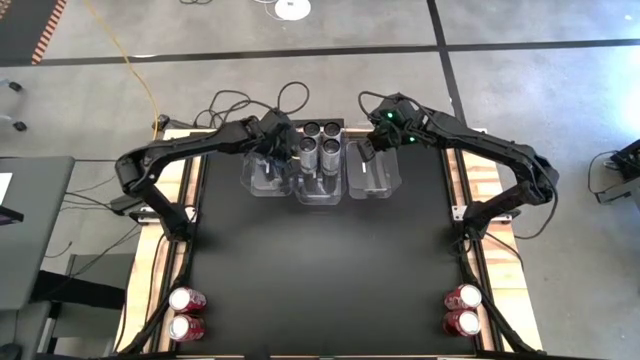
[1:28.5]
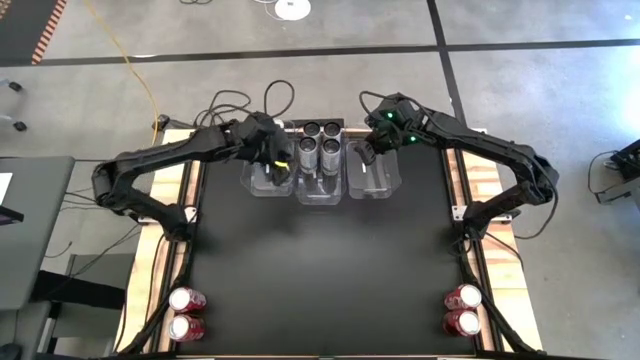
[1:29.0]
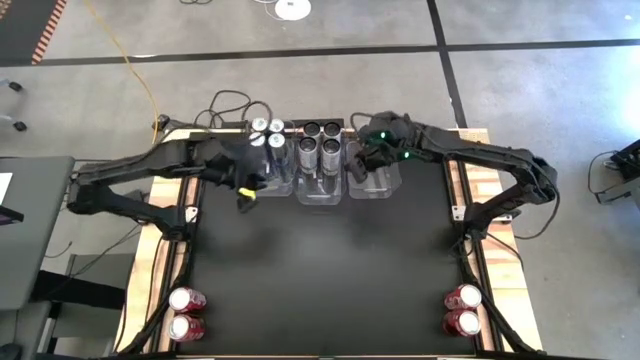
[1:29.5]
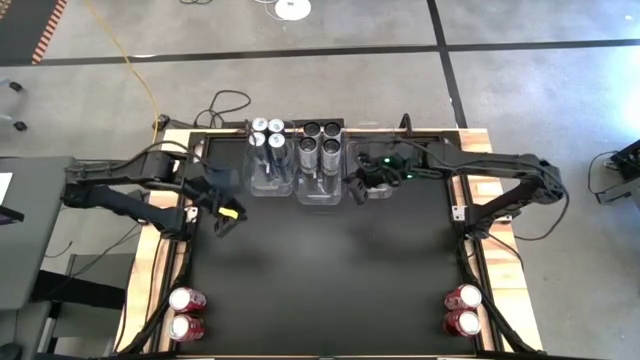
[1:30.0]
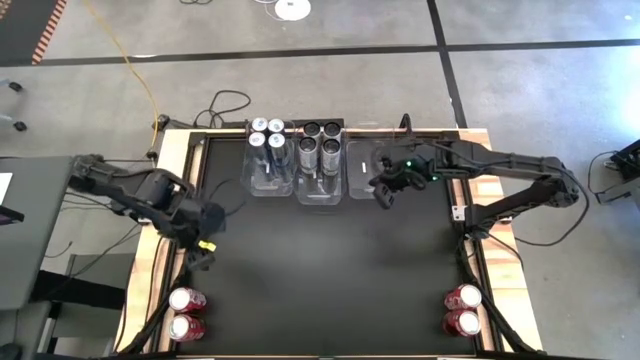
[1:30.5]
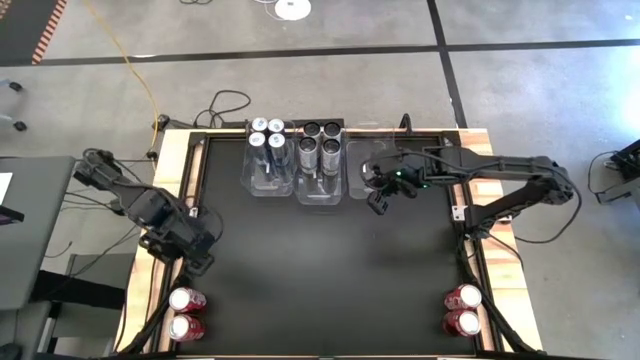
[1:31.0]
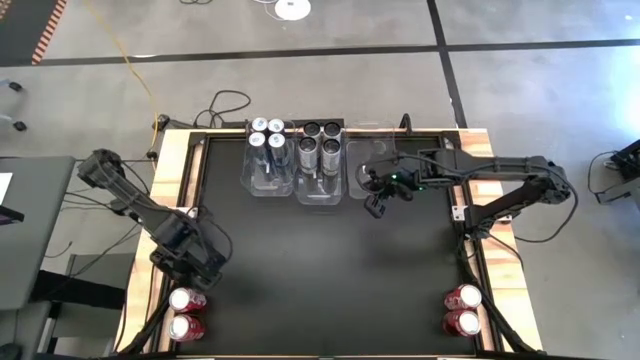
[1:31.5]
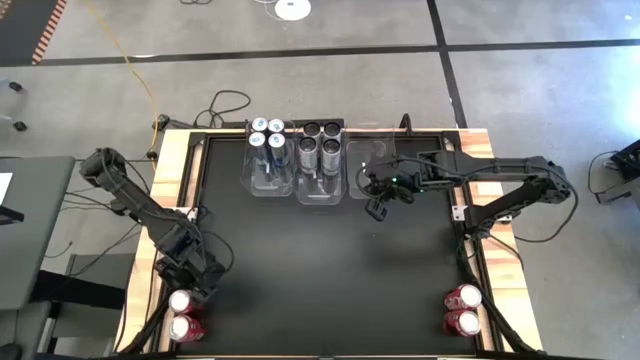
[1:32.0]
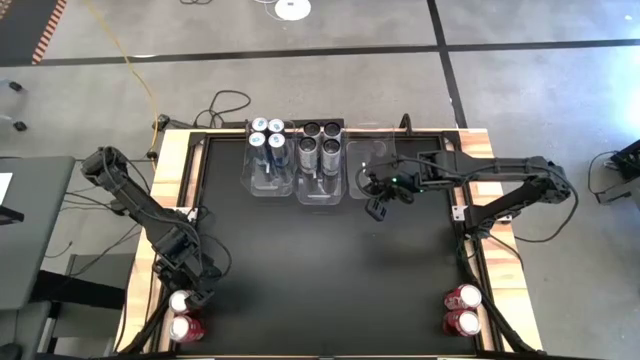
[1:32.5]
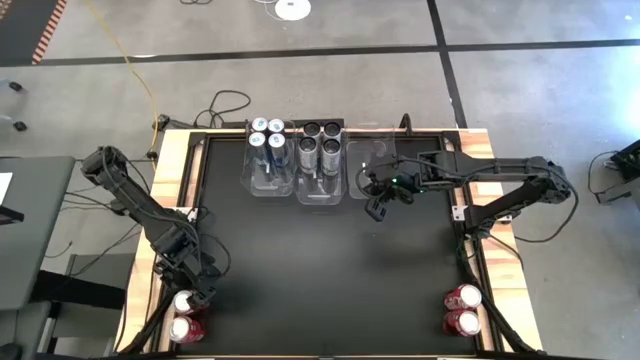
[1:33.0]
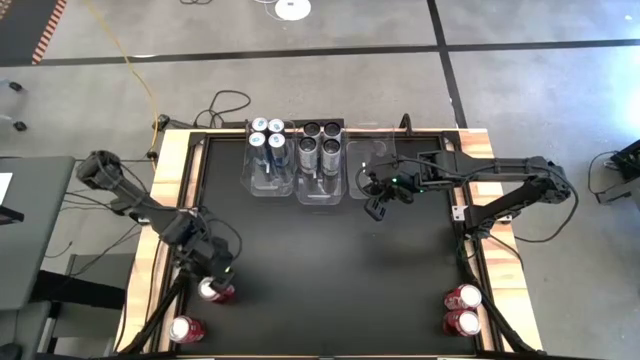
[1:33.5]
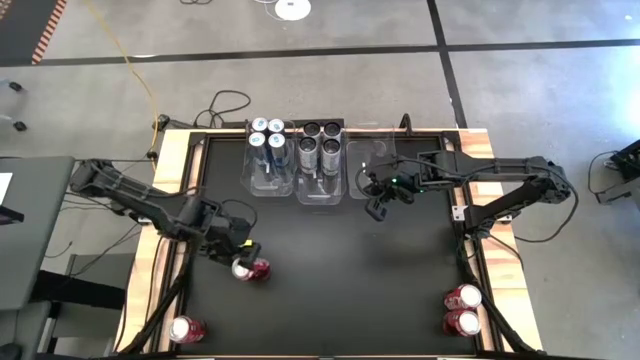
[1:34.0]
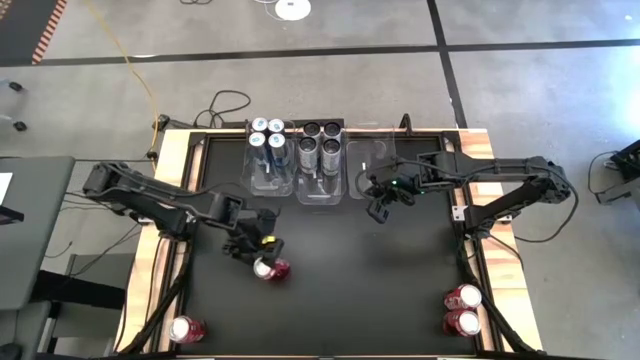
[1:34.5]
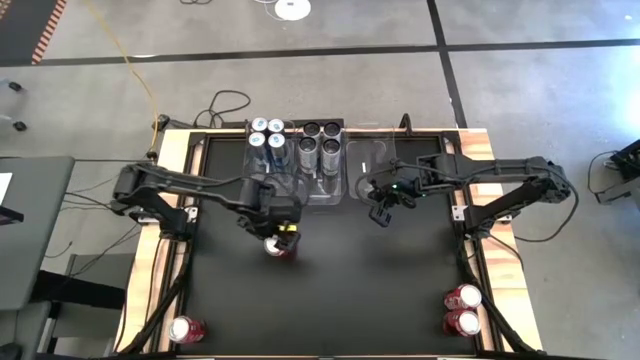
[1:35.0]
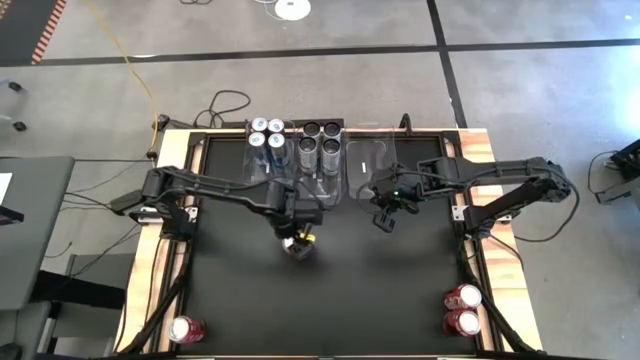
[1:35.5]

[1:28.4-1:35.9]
Task: Sort soda cans
Put the top left red soda can into the right transparent bin

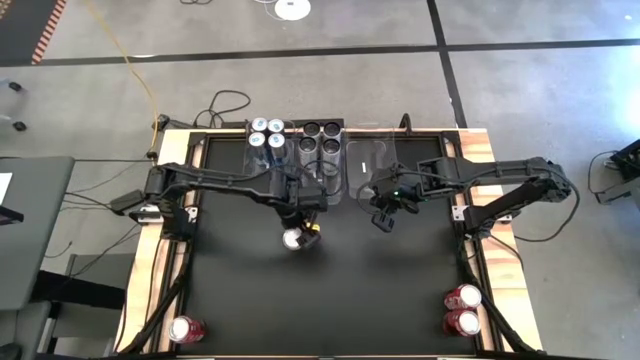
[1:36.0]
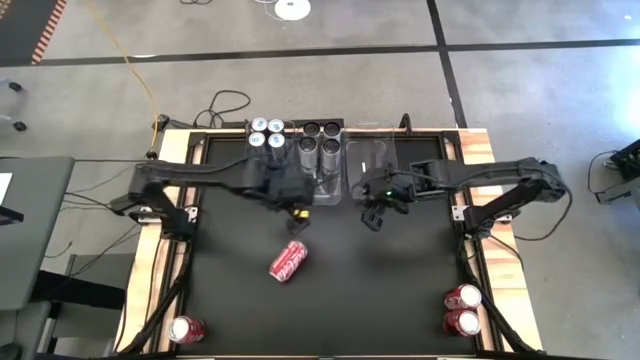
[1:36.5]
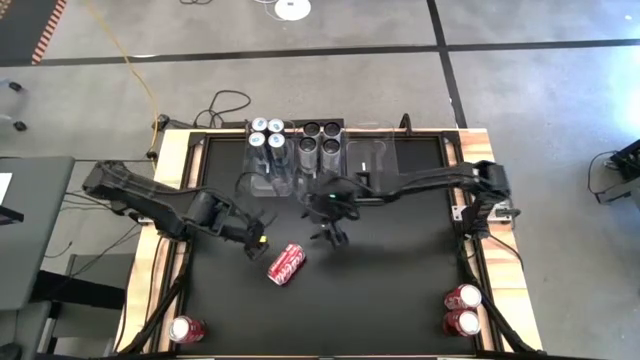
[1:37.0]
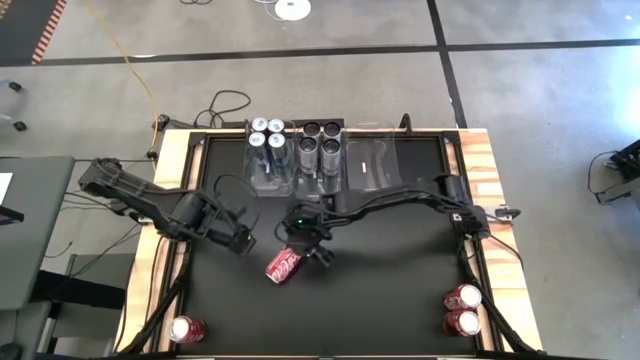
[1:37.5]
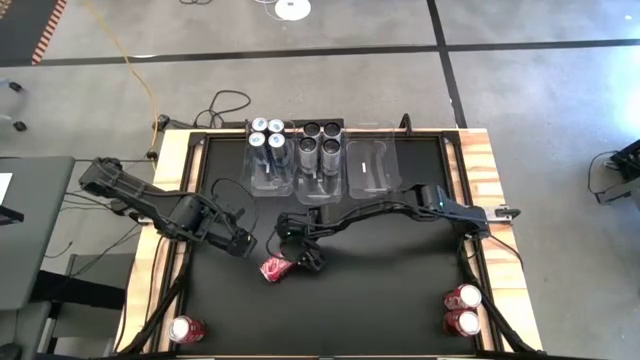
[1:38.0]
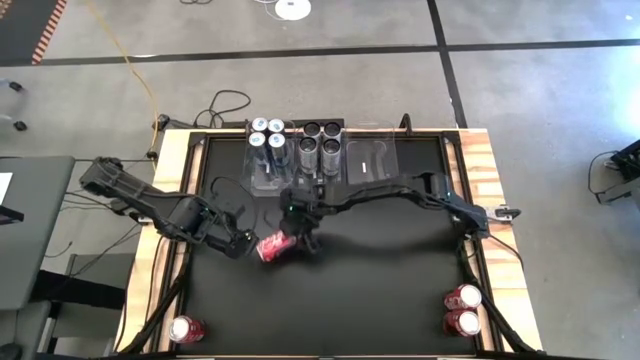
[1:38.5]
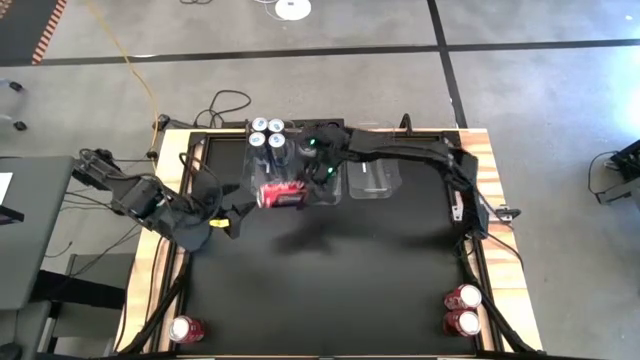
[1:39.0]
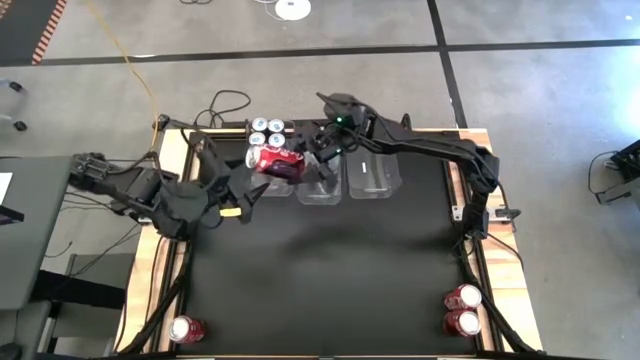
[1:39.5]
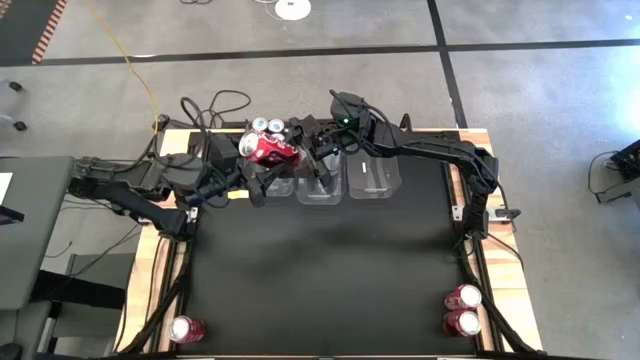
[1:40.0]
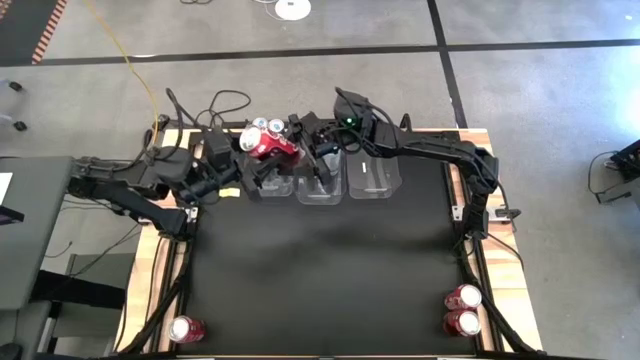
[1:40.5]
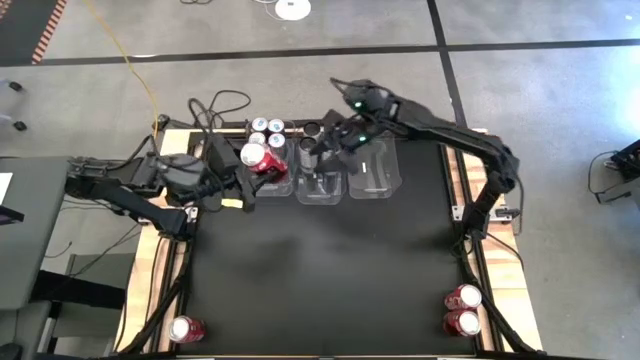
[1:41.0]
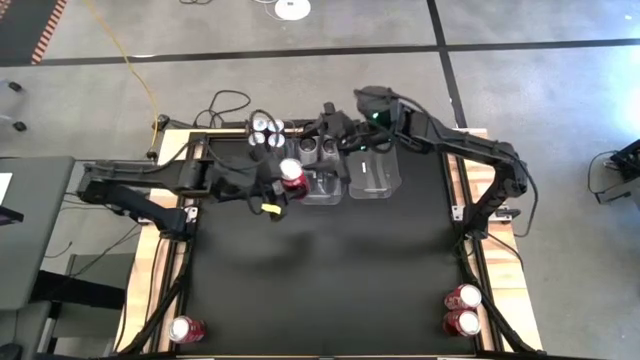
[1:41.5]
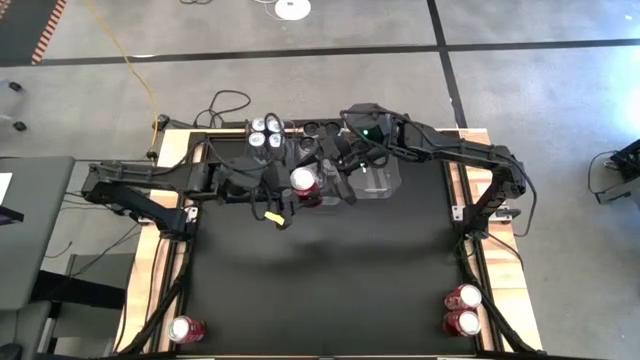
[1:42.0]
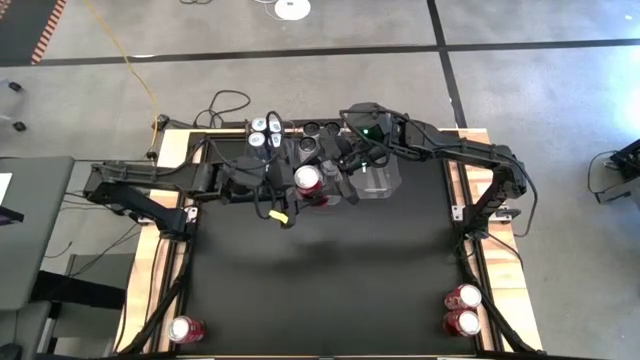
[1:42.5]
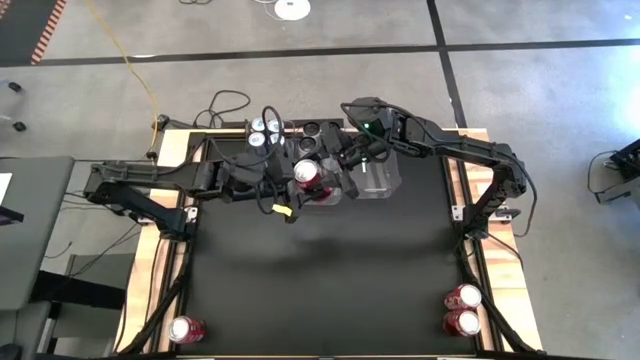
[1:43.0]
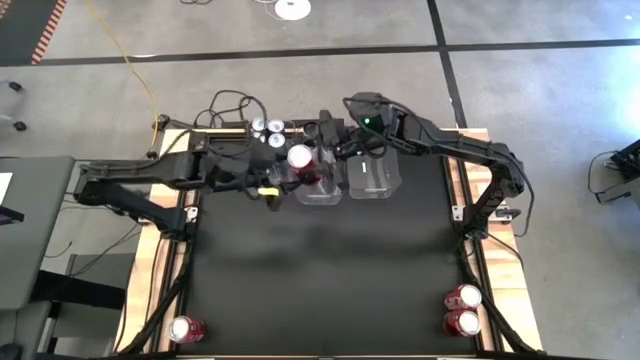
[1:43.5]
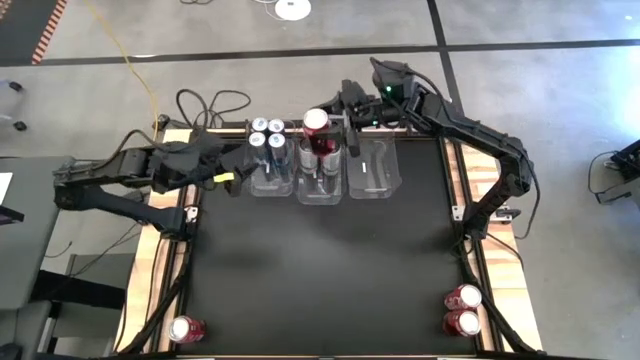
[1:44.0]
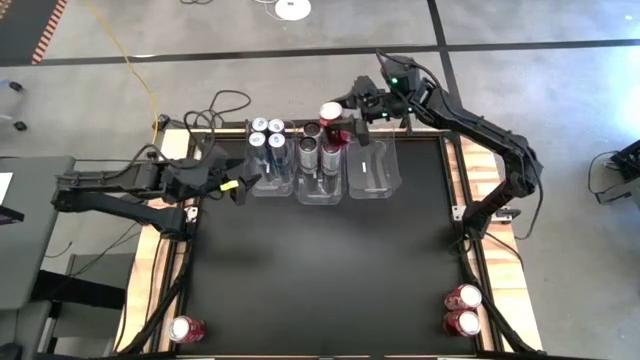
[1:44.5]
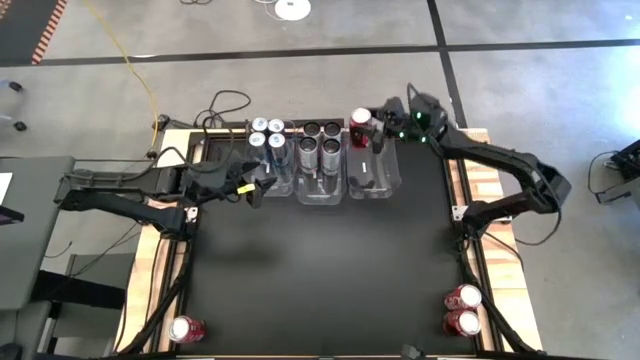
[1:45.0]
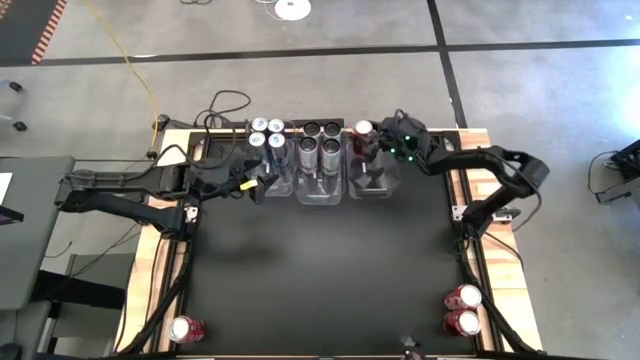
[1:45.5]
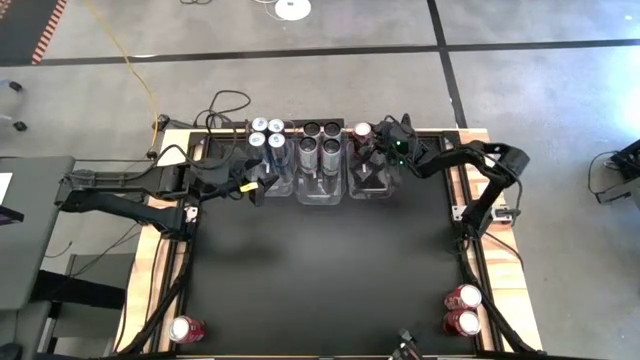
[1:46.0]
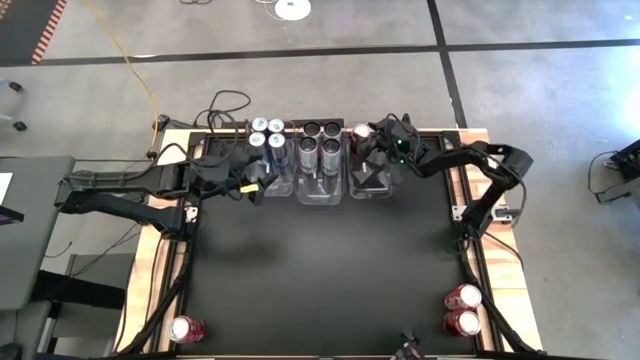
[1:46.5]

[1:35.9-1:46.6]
Put the top left red soda can into the right transparent bin

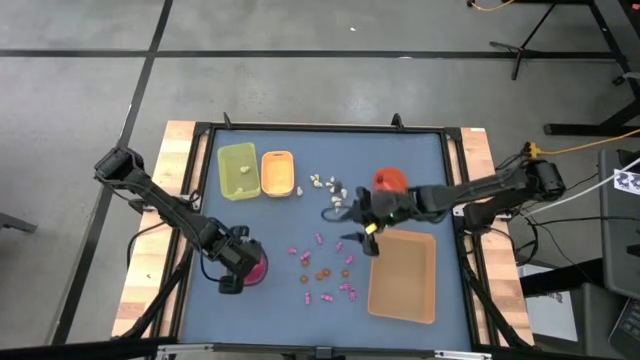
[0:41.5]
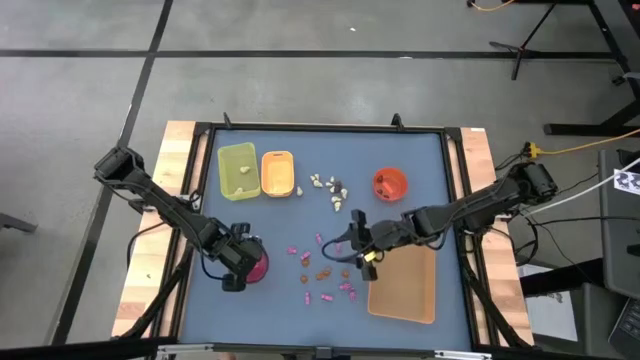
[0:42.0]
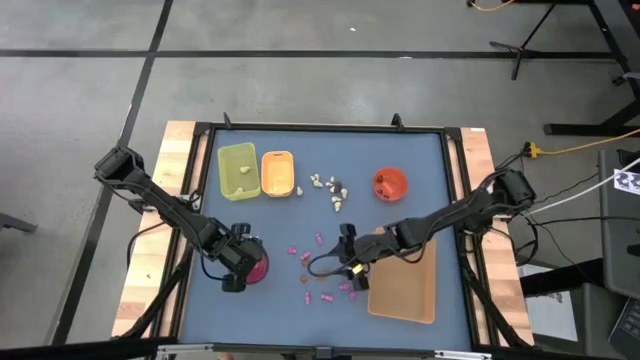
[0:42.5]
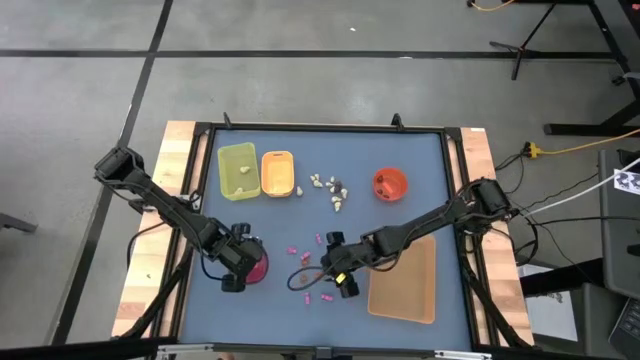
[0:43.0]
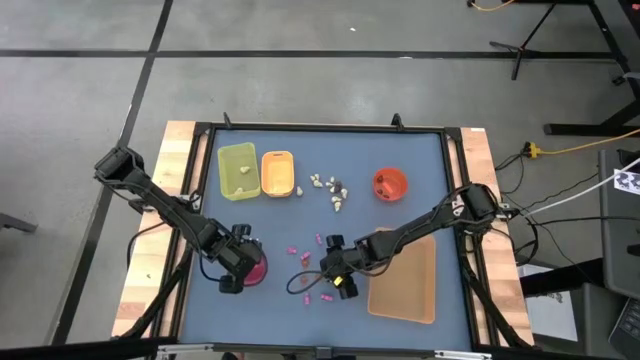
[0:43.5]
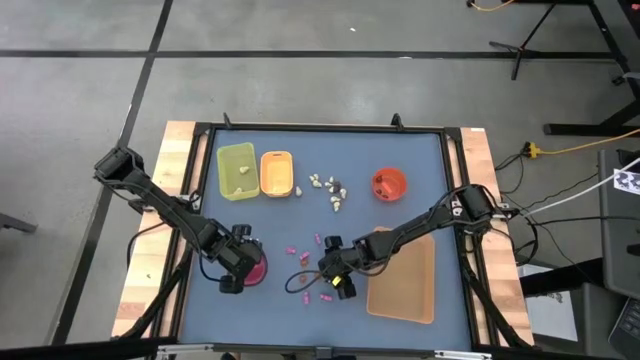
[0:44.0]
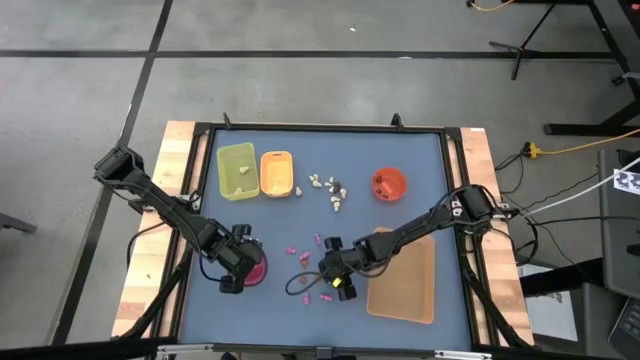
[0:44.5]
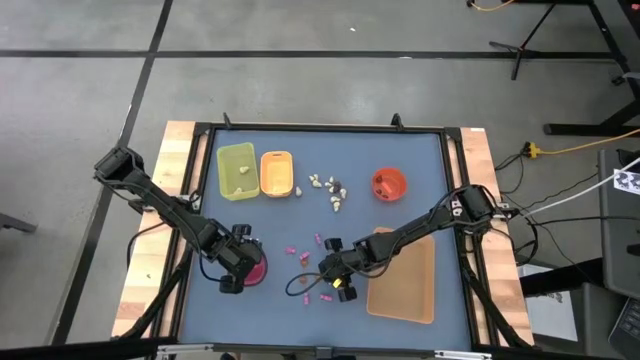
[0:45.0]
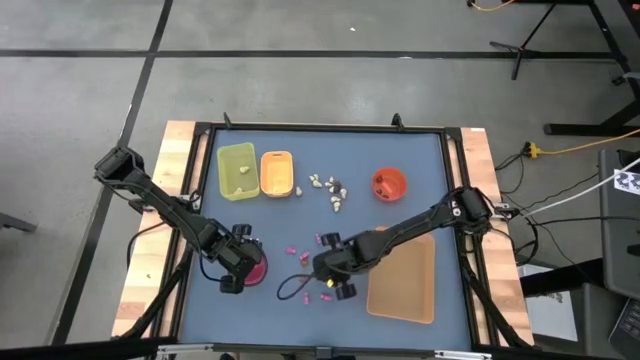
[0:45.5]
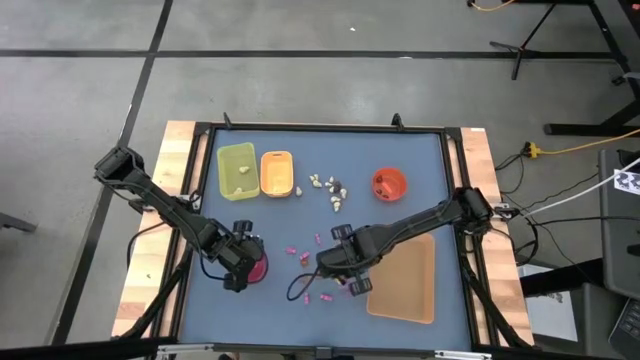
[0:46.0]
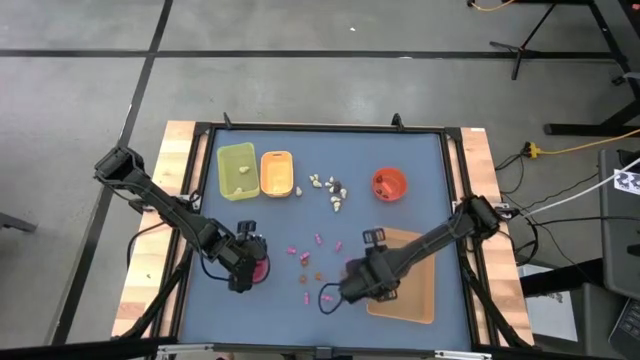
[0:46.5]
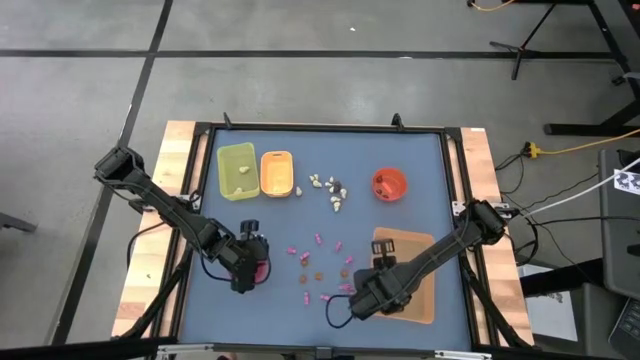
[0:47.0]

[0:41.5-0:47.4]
Task: Sort Halloween decoration
Put the orange pumpkin toy into the orange bin
